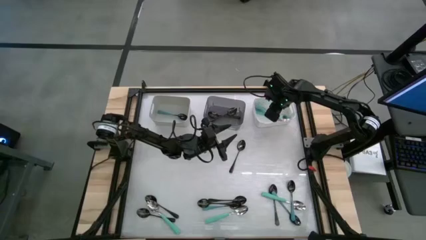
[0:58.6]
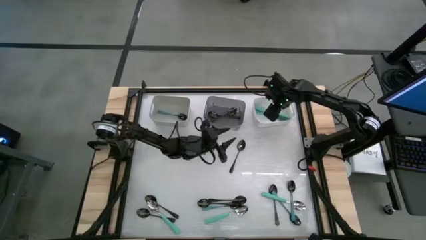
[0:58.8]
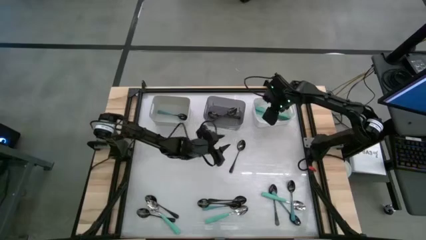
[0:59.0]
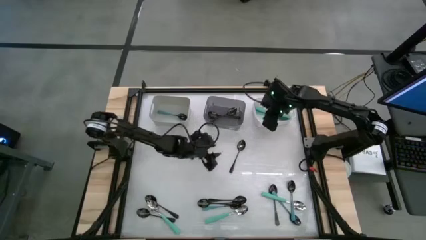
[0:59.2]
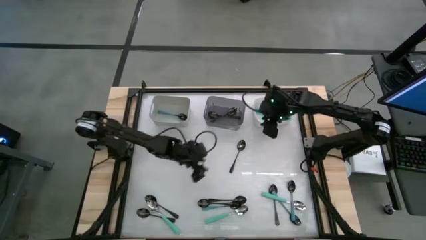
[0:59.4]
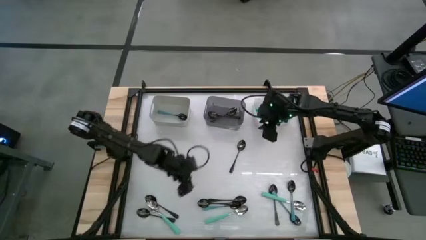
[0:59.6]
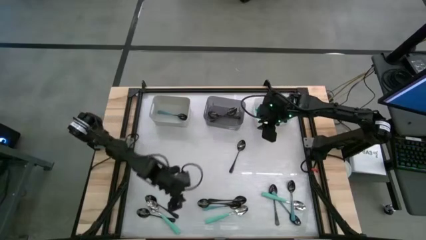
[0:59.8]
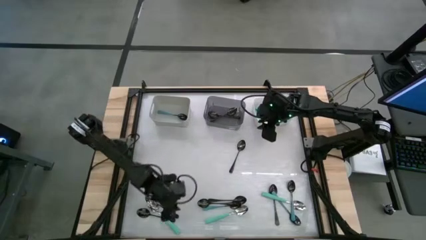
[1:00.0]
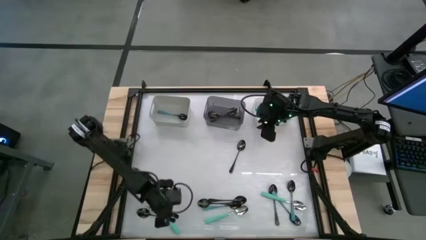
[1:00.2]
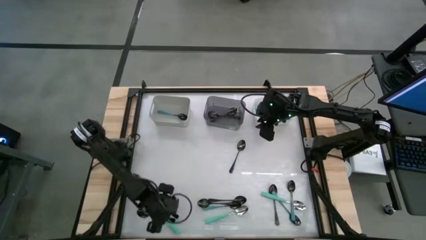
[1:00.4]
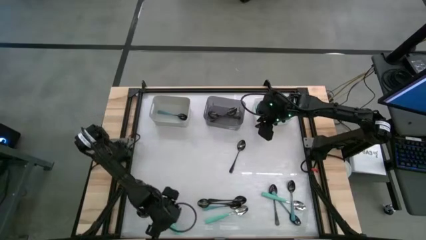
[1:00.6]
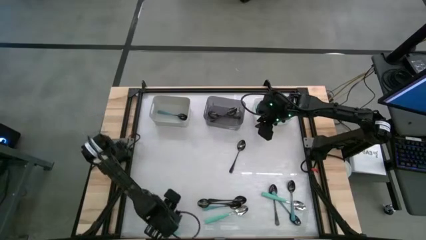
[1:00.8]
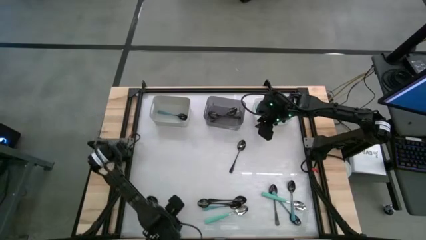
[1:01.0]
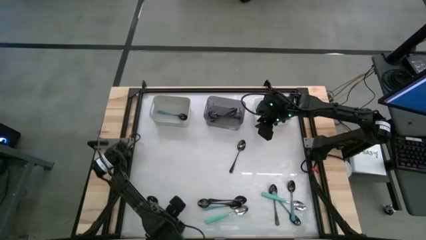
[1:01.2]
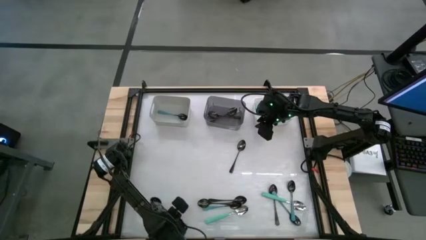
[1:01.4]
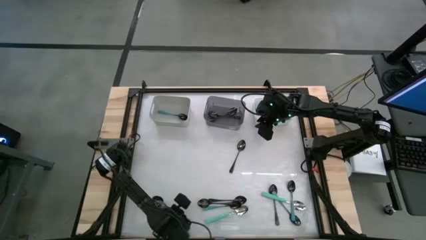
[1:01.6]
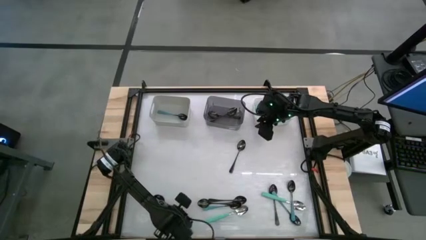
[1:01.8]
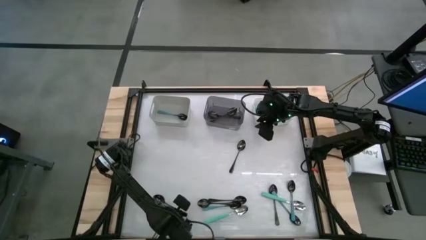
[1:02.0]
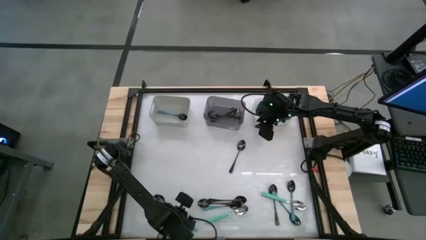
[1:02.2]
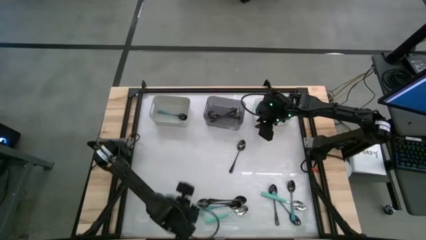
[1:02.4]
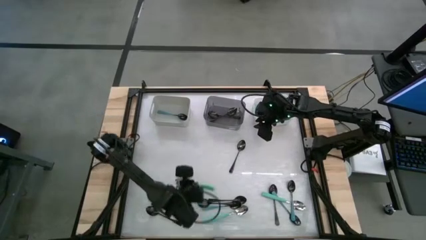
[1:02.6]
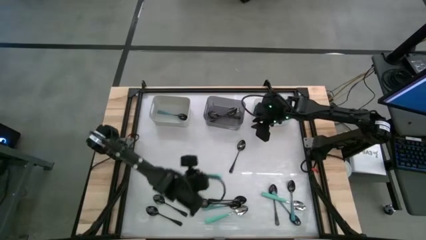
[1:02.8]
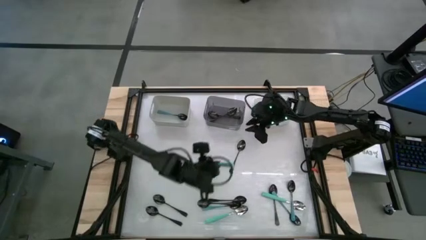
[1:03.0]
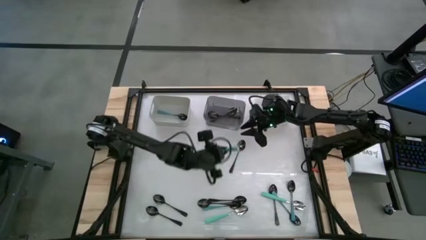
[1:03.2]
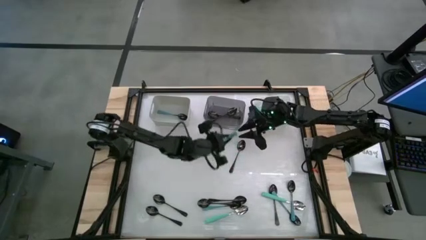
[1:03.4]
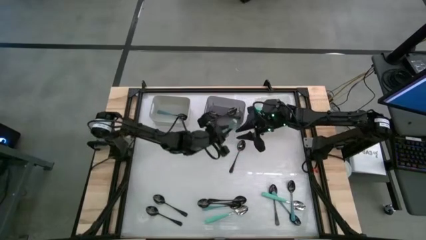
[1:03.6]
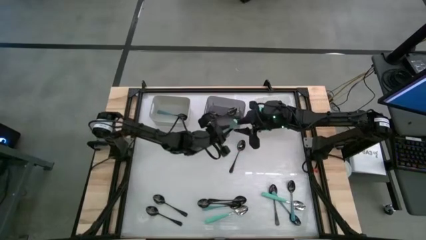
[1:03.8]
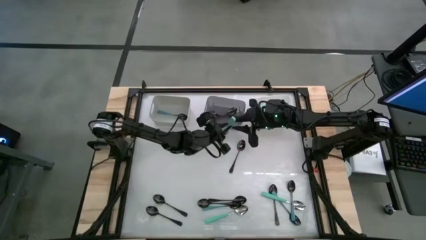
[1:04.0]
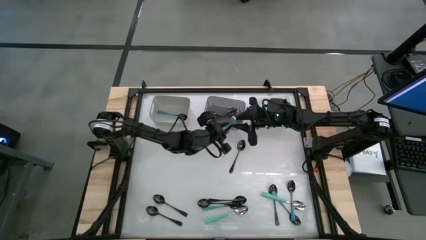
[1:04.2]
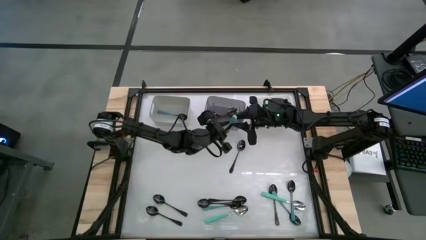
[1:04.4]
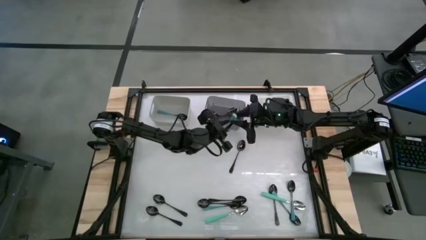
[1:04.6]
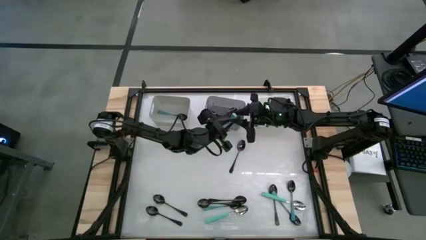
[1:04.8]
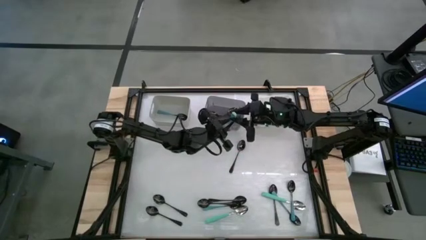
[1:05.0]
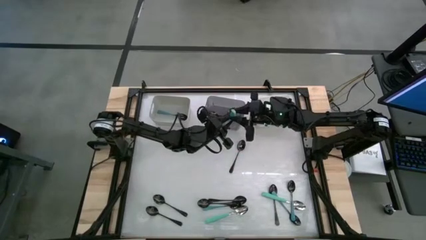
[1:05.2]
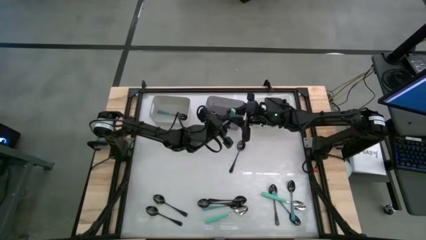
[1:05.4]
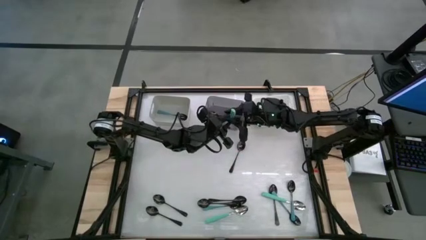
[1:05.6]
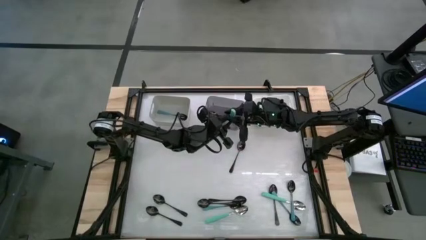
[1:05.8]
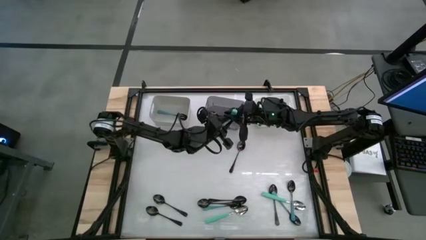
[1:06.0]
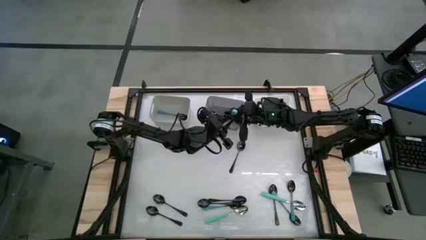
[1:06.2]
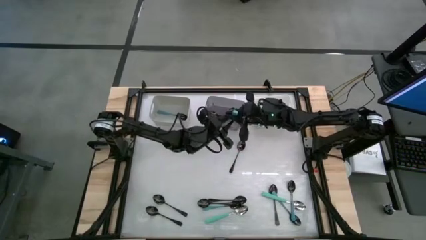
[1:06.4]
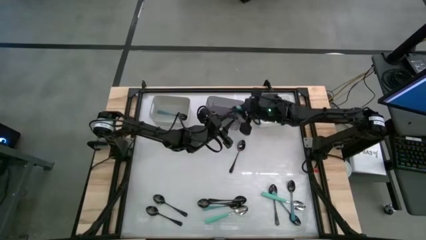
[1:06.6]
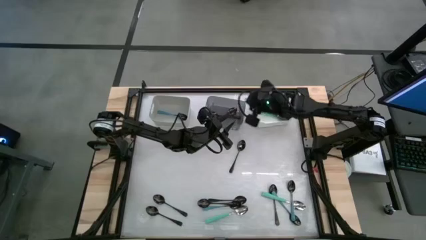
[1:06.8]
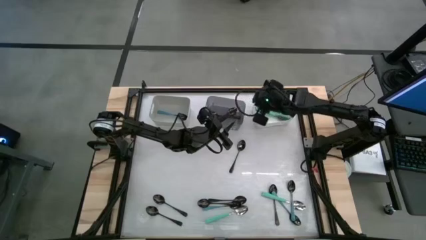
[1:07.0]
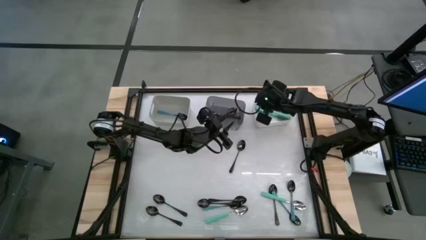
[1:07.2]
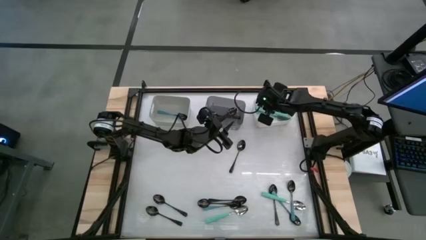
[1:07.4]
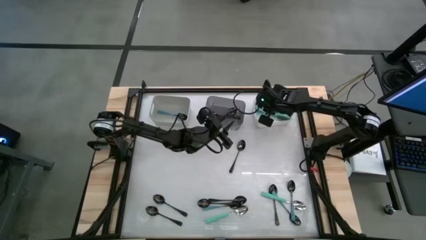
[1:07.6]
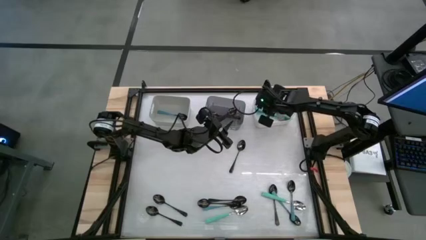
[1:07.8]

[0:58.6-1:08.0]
Task: Sort silverware by color (type)
Put the green spoon into the white bin

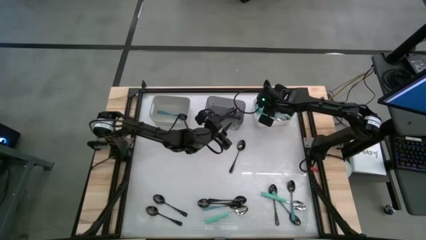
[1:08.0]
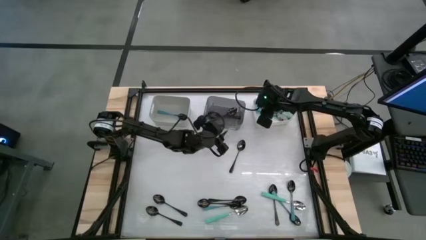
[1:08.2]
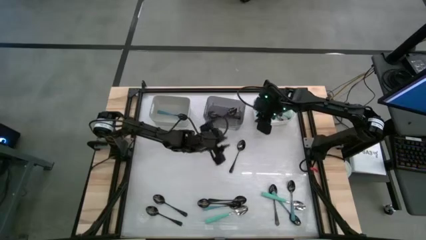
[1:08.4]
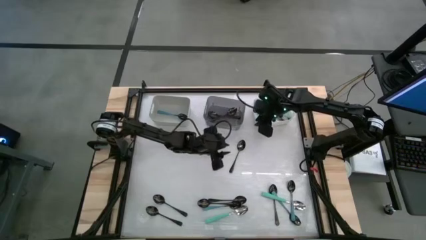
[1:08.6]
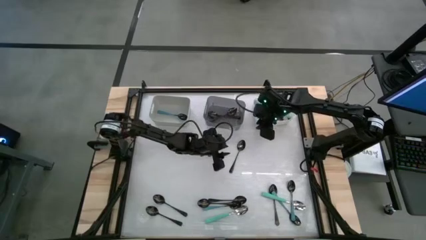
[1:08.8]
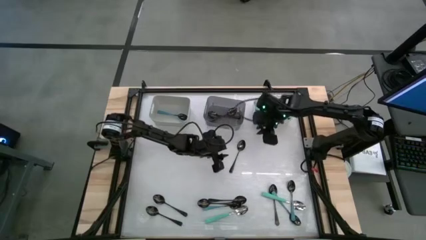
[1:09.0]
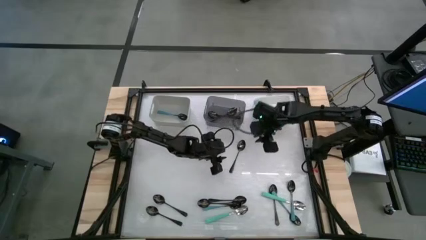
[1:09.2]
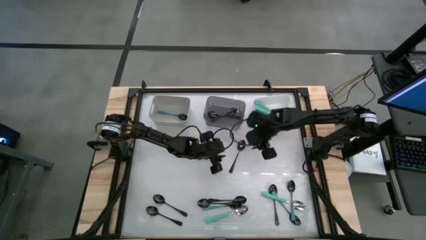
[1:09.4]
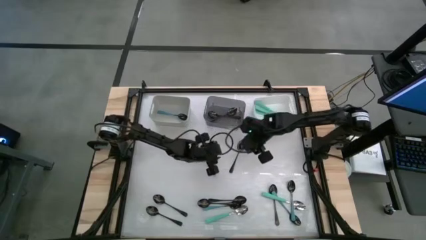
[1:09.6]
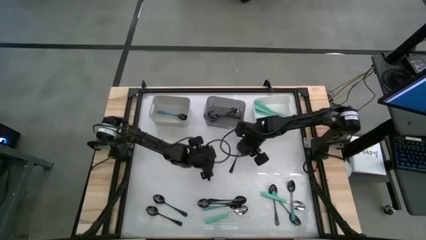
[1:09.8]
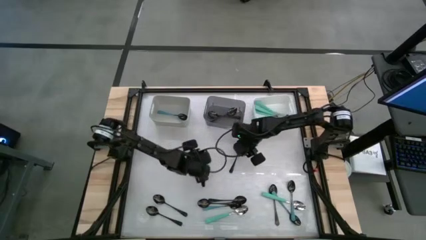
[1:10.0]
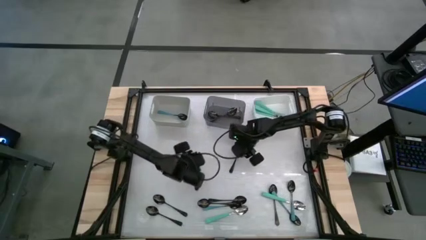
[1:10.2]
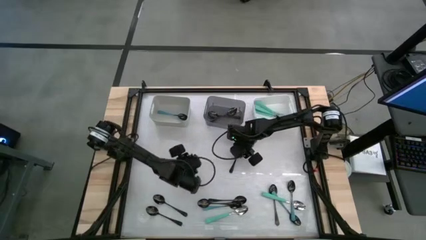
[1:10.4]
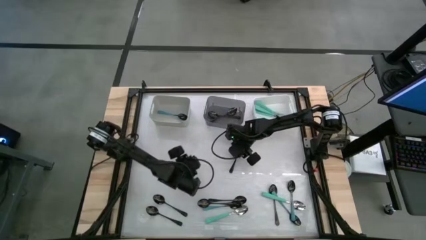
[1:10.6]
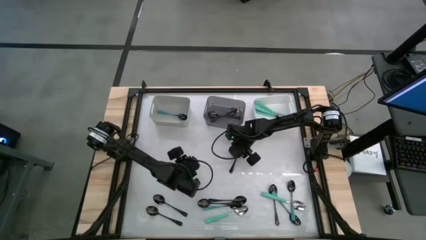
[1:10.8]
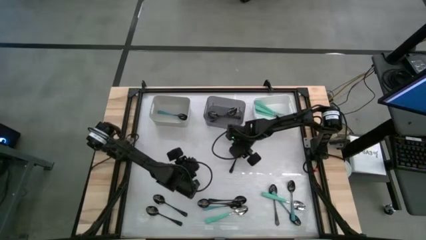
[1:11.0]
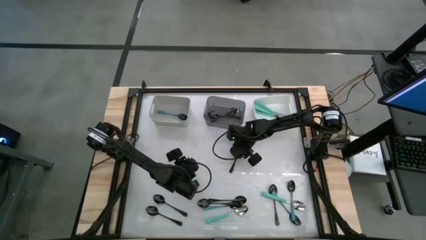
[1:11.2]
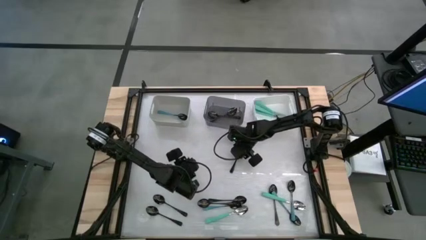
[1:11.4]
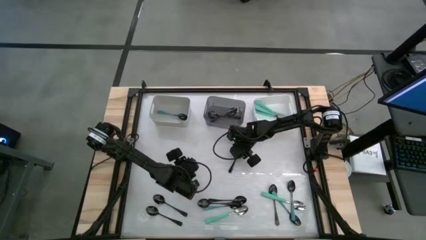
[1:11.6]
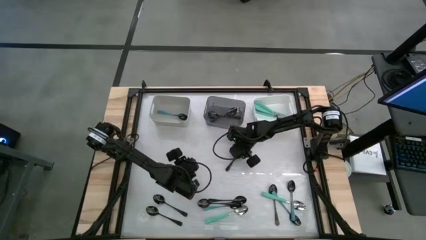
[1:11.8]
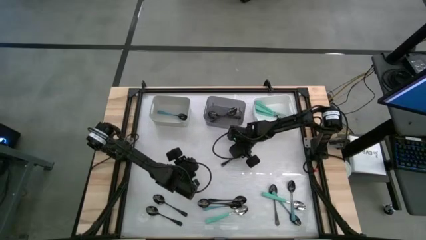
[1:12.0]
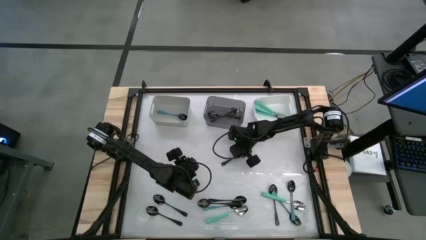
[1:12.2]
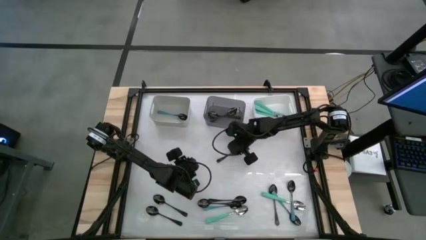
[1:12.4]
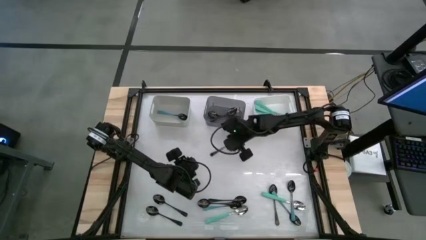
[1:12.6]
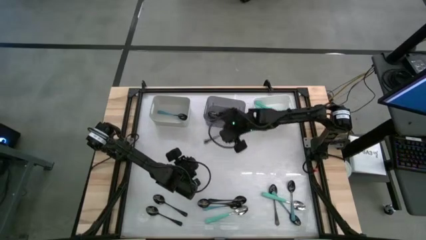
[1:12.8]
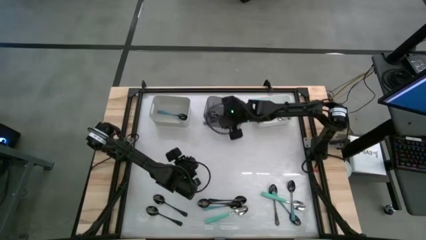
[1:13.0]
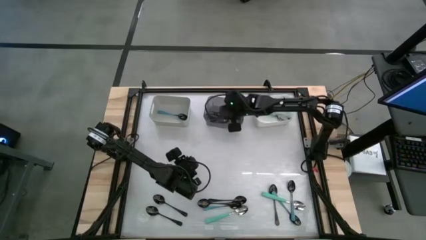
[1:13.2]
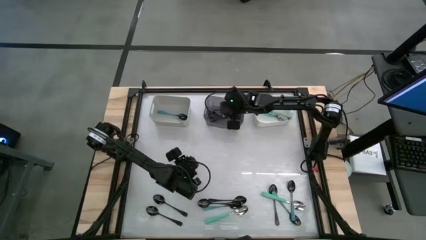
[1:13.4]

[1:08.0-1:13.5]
Put the black spoon into the black bin
